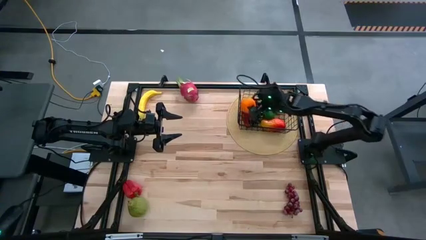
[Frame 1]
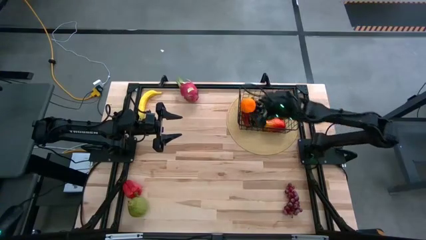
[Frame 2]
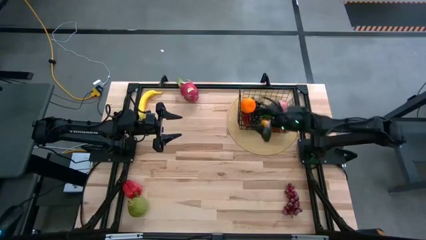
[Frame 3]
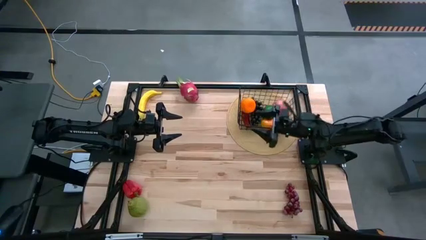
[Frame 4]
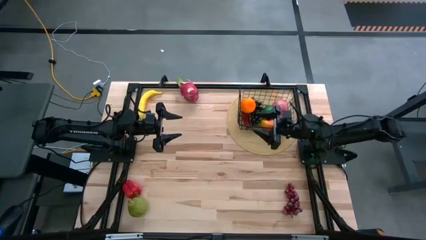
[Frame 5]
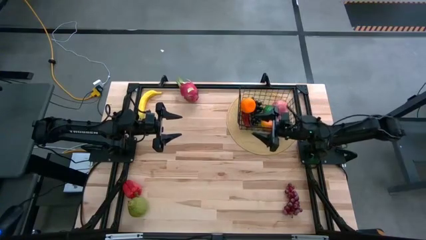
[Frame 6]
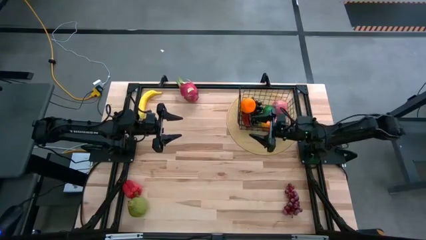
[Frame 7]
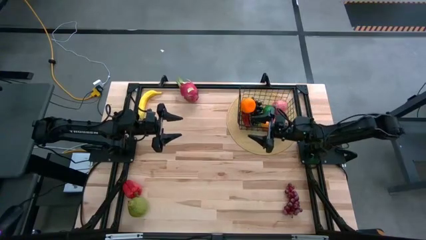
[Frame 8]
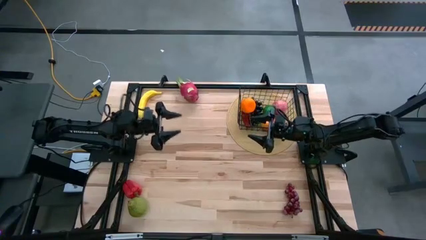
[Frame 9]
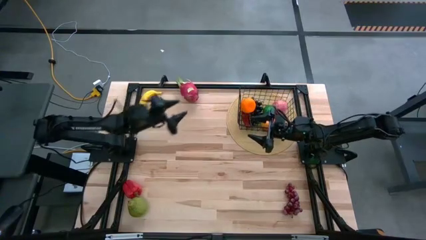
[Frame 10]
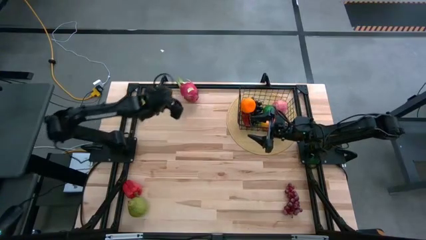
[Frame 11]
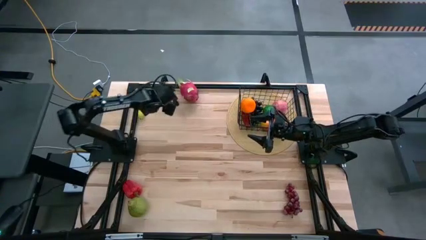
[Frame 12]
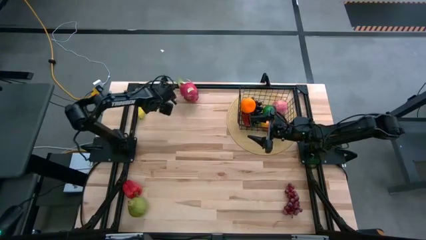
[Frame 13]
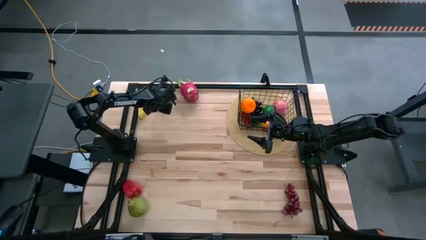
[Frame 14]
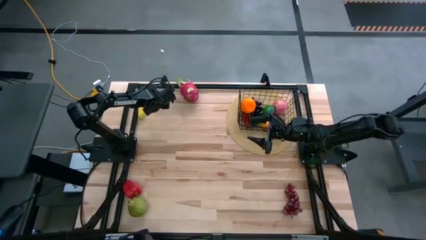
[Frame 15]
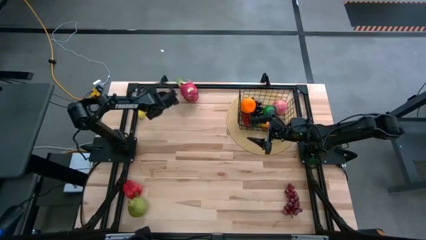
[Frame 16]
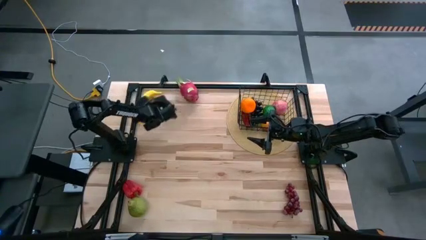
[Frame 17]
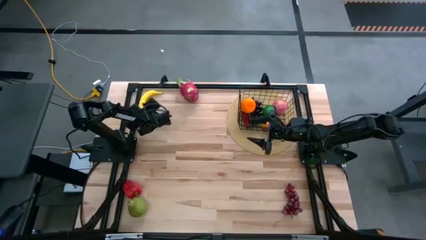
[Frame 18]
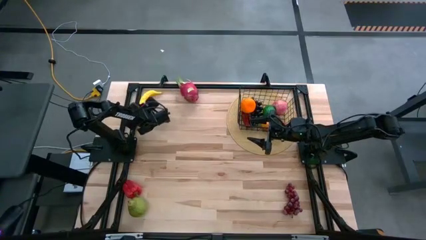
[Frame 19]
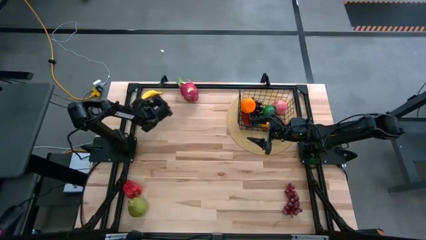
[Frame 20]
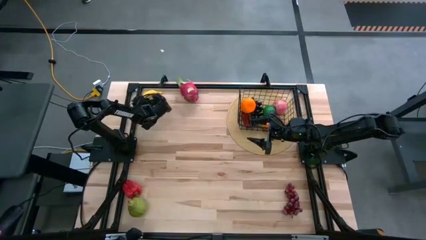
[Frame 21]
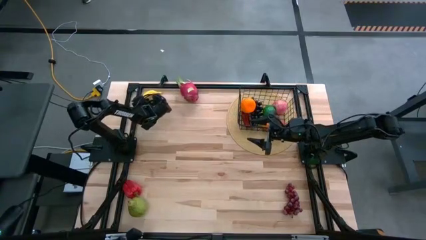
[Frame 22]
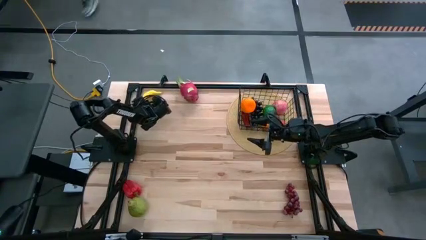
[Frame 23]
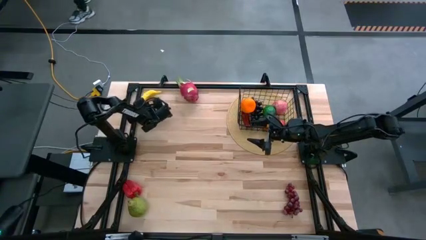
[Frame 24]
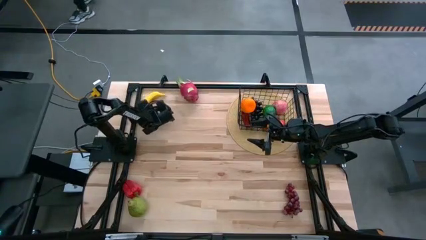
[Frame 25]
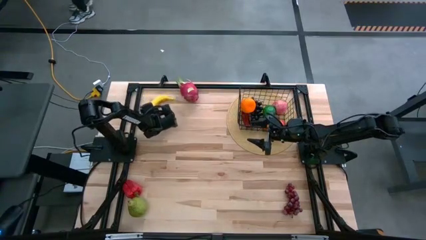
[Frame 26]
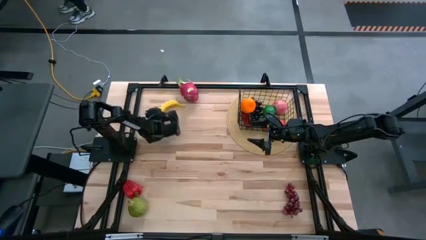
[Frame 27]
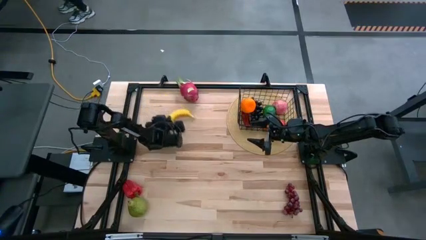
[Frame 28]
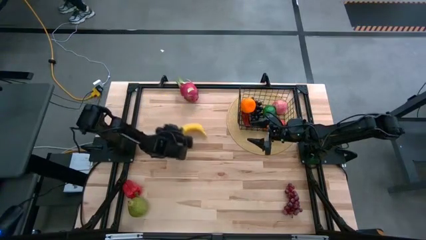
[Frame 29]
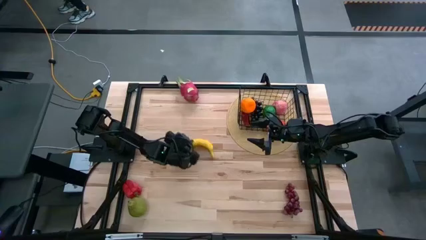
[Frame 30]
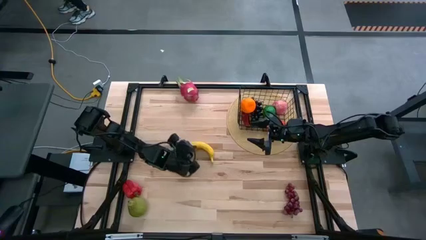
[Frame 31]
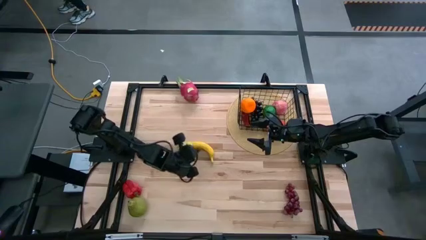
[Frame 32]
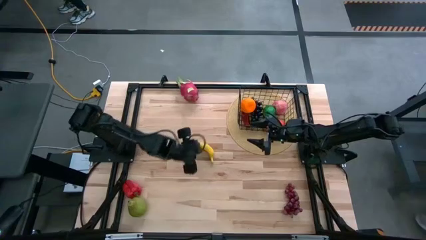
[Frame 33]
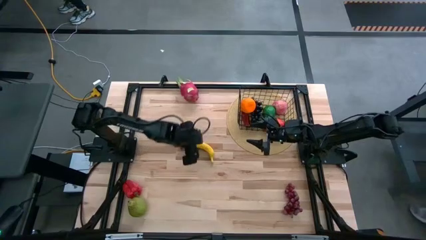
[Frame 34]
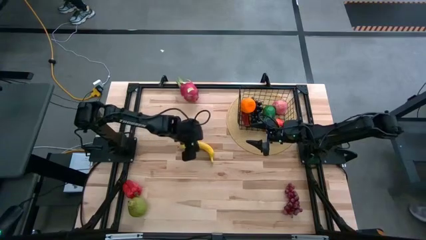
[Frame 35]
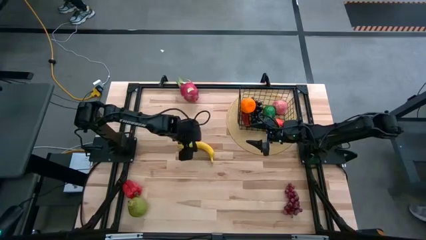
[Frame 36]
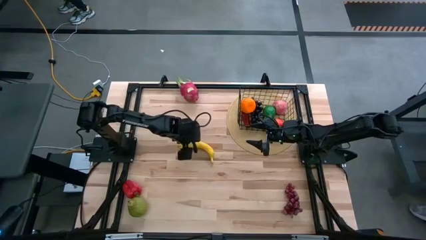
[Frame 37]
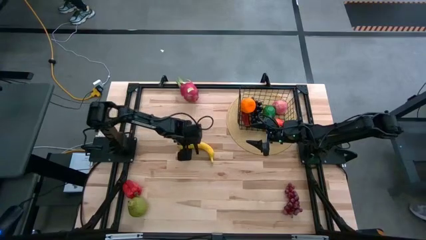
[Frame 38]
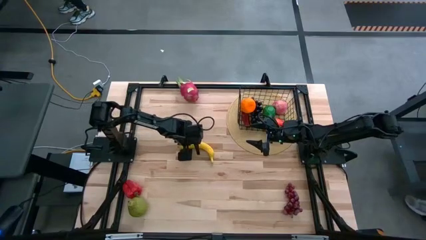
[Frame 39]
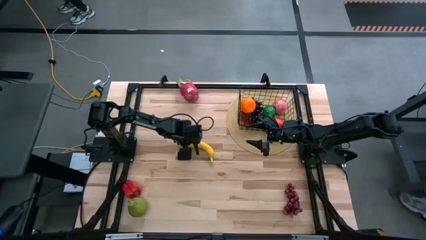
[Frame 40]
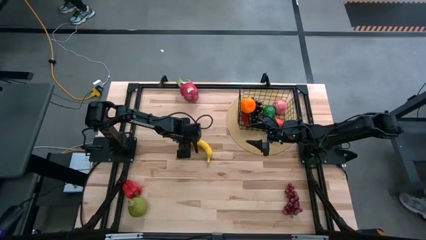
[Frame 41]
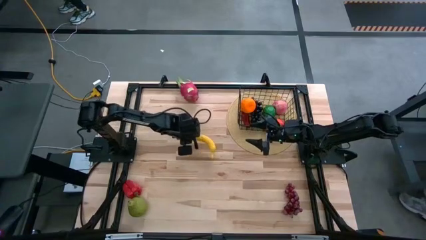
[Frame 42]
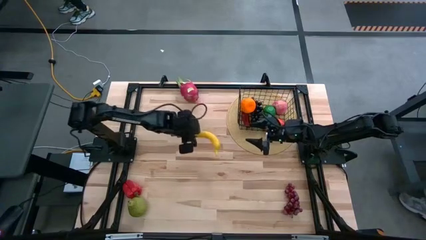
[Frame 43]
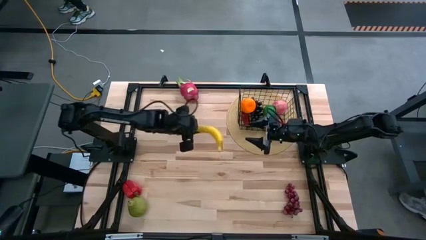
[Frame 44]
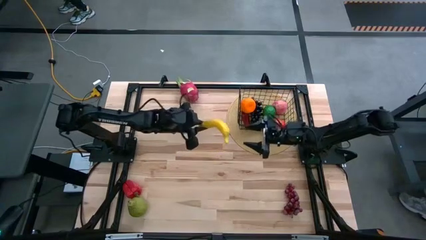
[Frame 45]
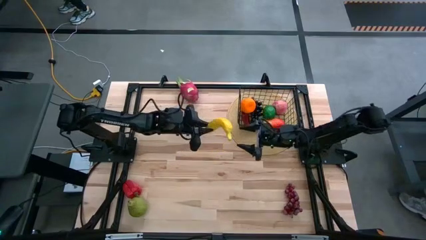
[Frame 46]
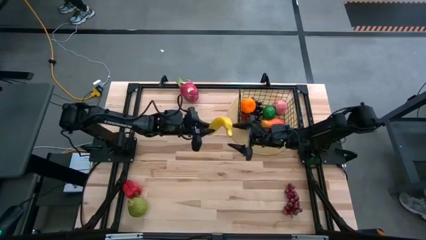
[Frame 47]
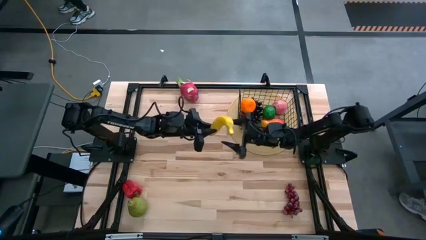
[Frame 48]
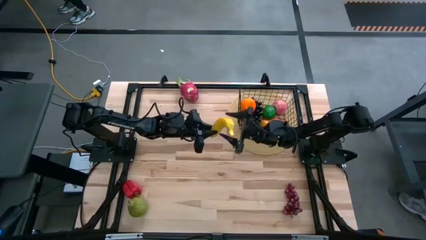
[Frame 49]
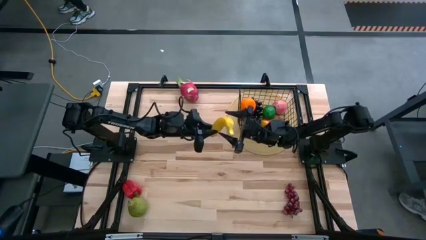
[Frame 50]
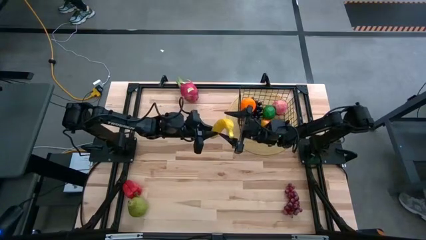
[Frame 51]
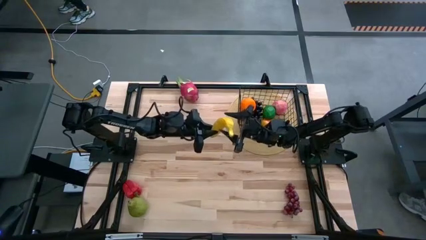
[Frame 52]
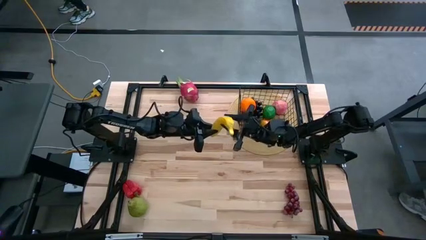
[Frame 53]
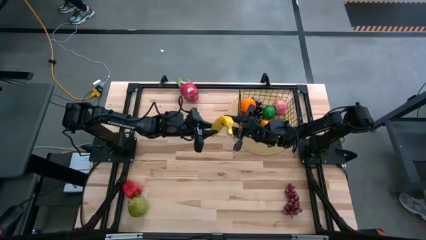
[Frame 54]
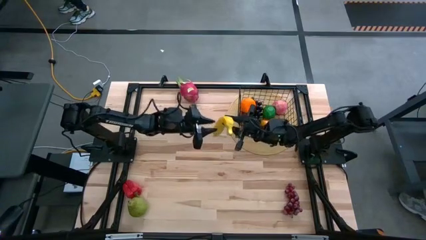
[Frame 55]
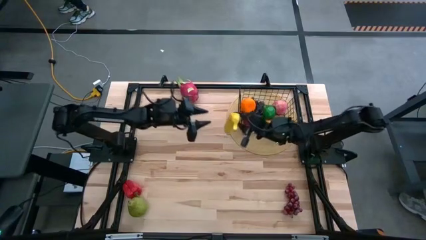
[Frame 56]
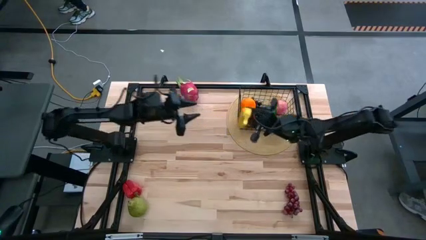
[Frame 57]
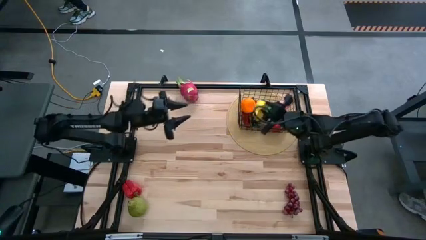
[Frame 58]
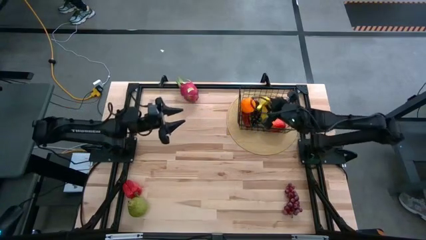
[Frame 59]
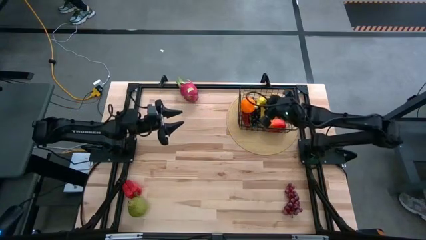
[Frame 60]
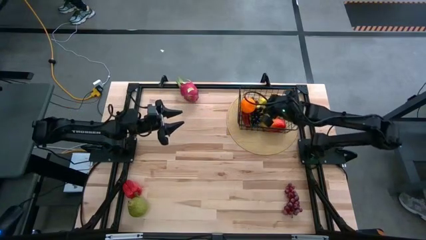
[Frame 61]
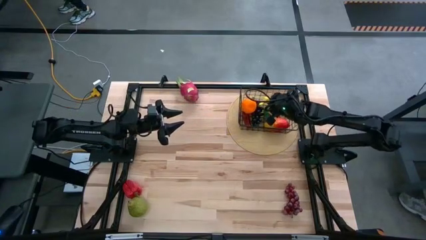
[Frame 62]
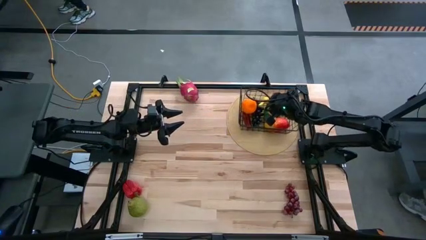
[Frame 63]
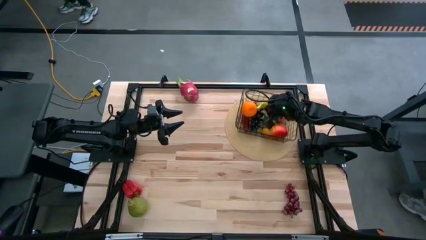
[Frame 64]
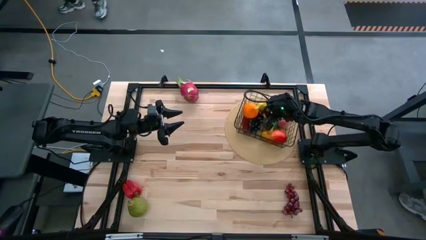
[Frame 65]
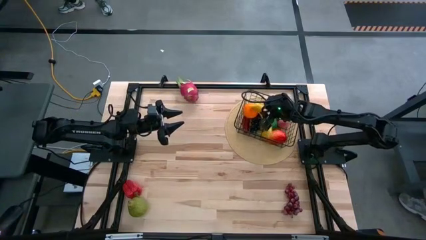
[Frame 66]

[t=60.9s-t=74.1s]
Task: Build produce basket
Put the banana into the wire basket

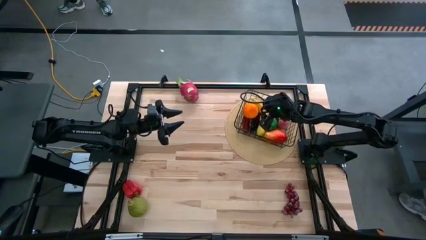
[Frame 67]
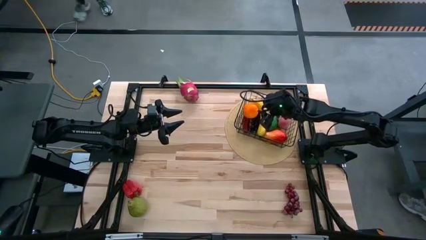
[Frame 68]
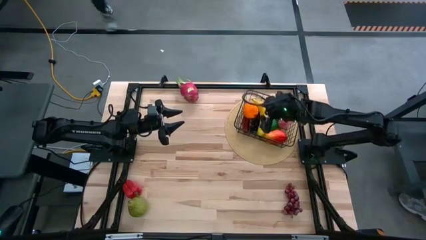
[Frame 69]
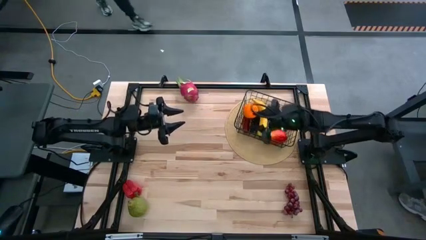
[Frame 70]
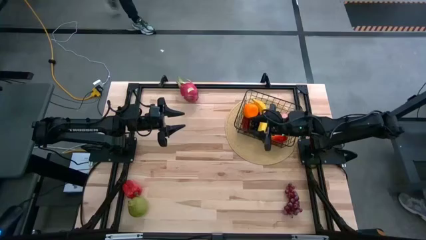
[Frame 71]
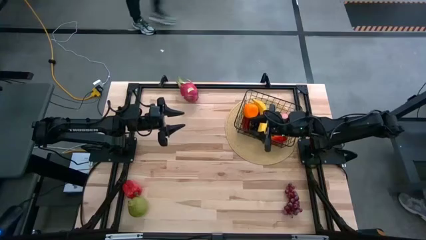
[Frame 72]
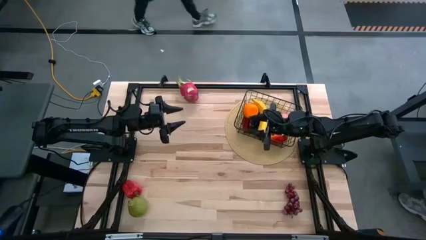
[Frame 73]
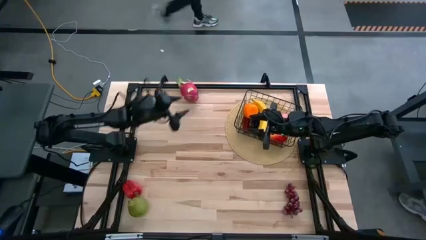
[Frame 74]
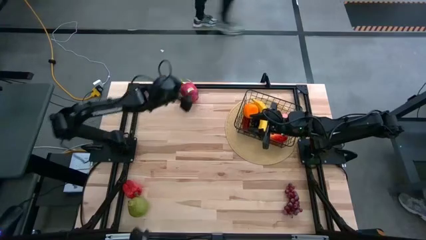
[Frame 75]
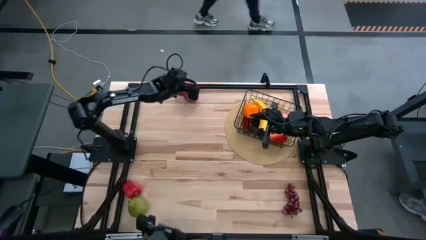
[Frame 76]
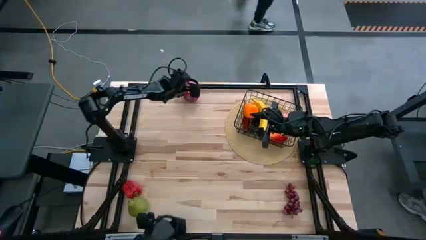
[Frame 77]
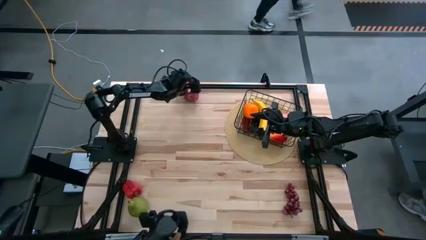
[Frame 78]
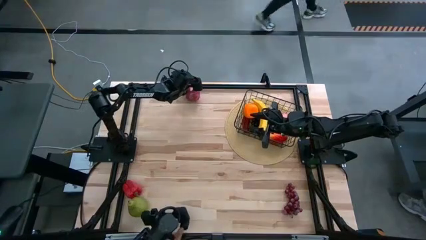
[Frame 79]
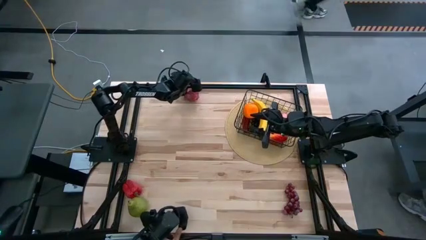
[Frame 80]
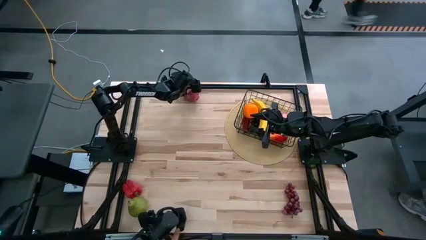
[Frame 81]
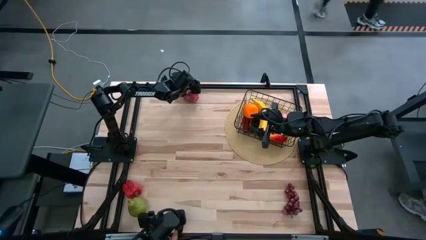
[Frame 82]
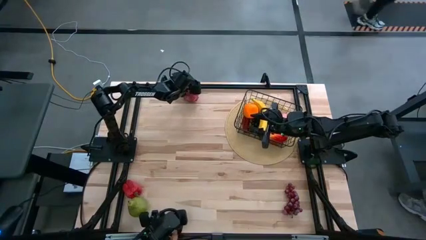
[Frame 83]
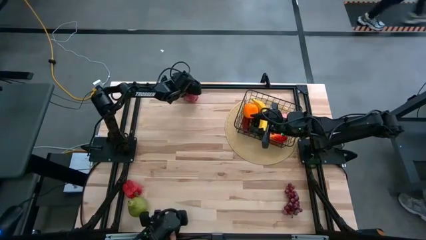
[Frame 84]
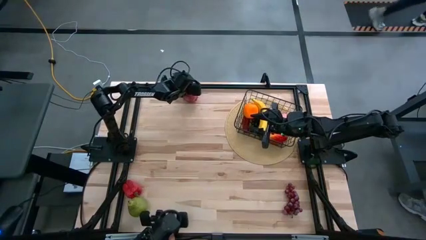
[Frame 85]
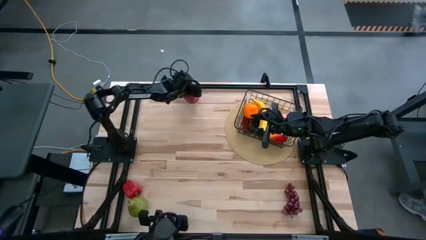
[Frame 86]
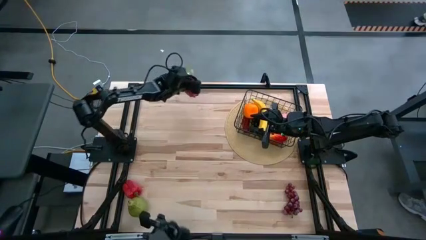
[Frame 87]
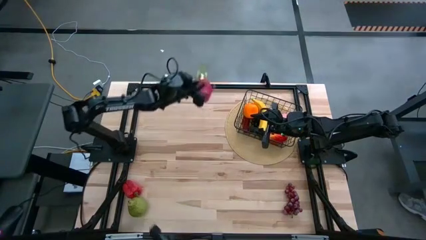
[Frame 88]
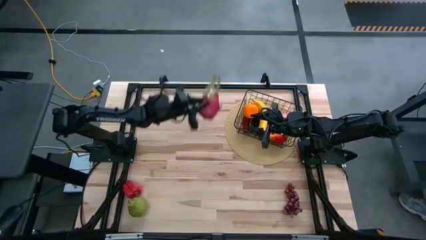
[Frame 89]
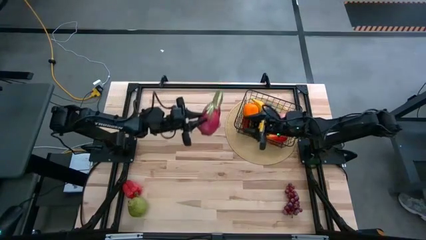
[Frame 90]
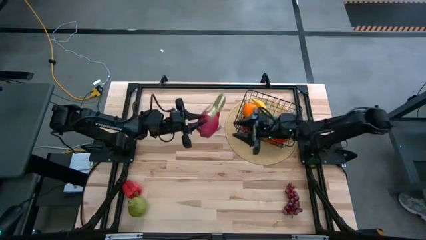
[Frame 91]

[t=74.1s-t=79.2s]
Put the dragonfruit into the wire basket
